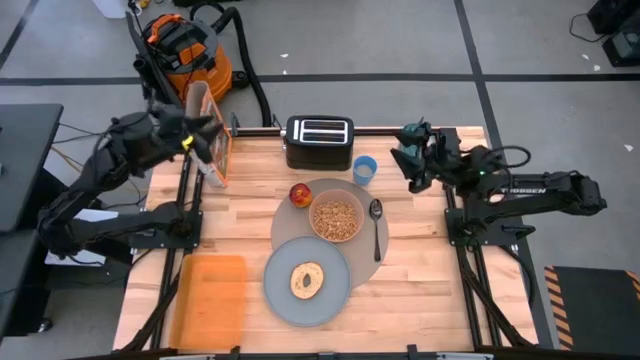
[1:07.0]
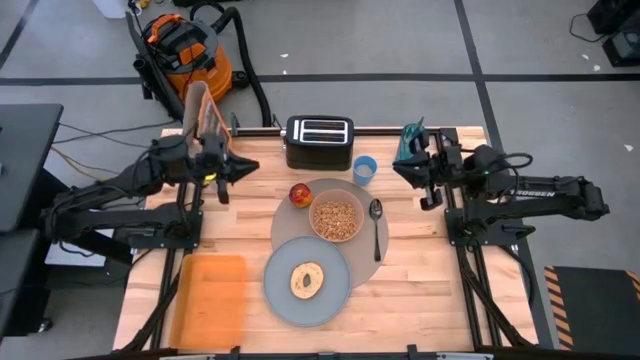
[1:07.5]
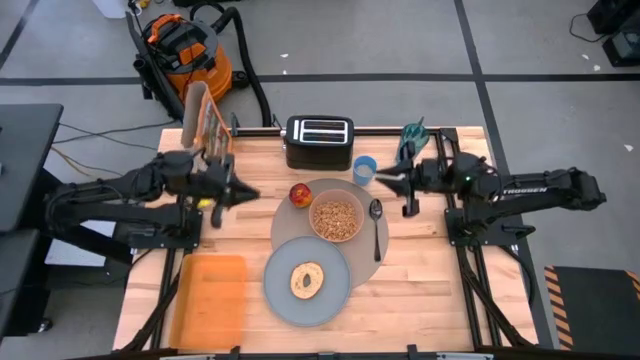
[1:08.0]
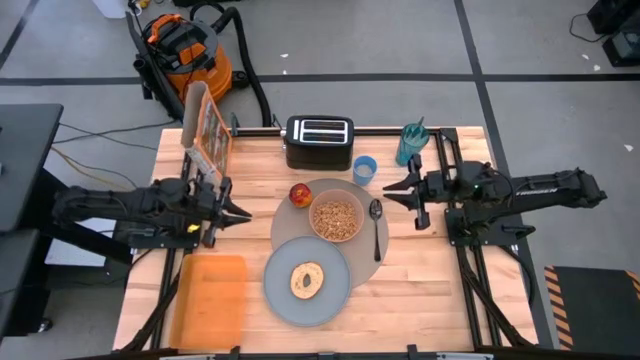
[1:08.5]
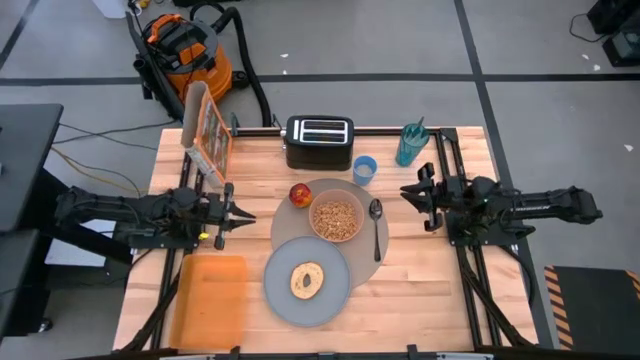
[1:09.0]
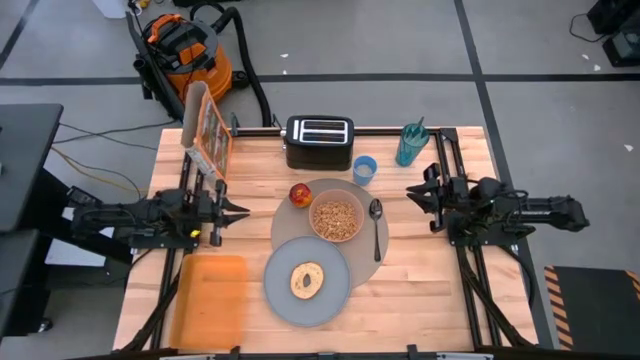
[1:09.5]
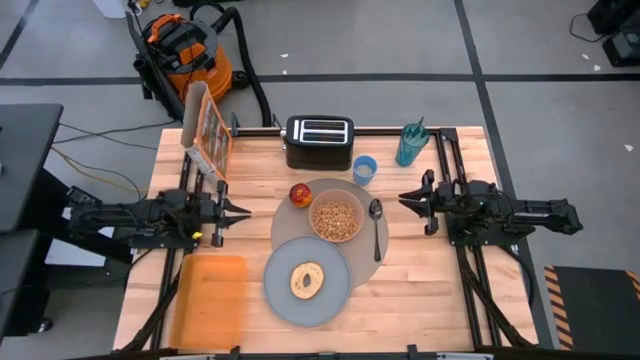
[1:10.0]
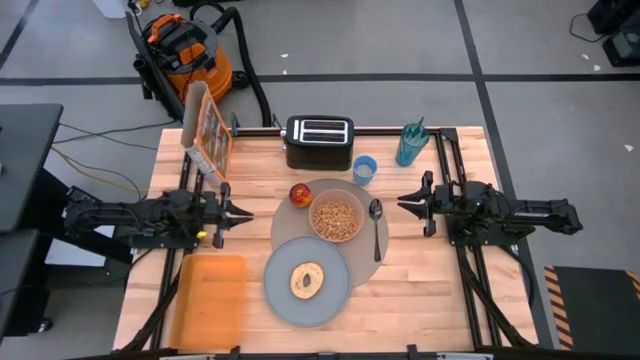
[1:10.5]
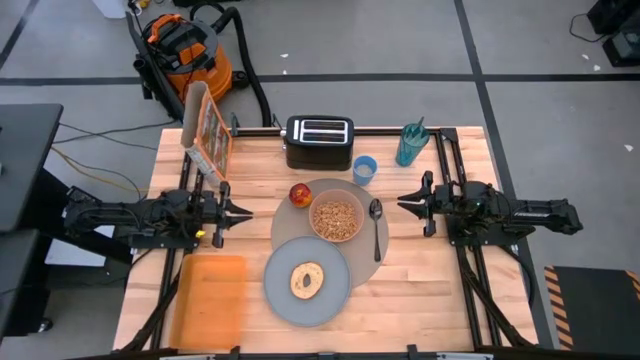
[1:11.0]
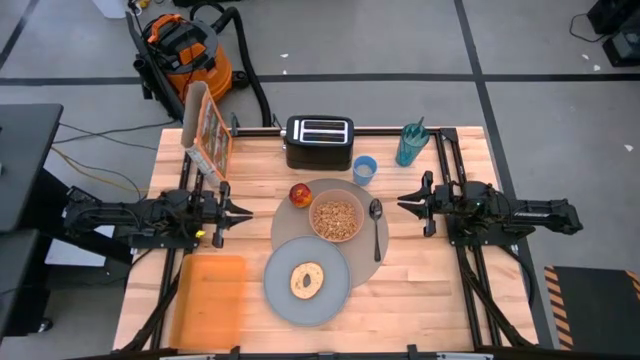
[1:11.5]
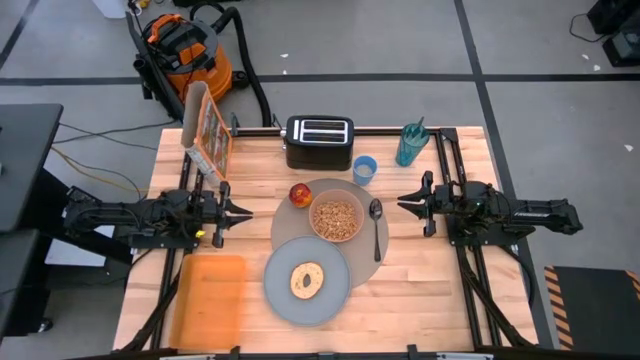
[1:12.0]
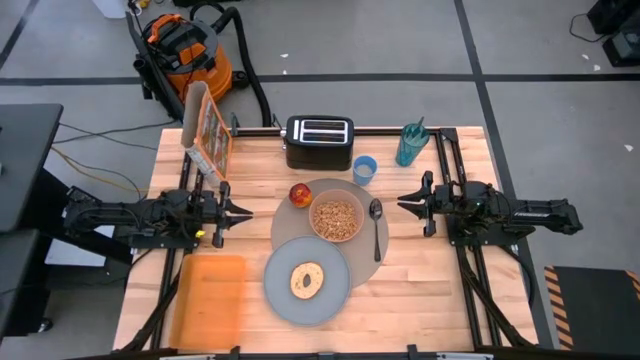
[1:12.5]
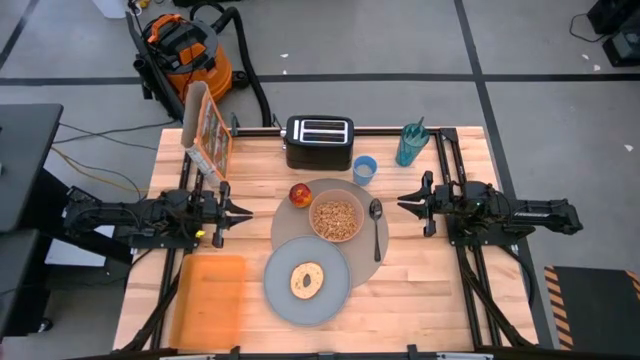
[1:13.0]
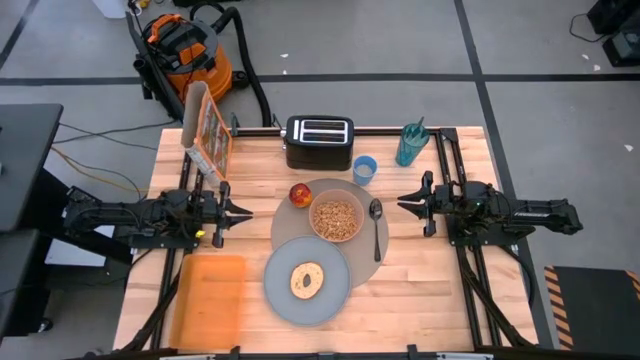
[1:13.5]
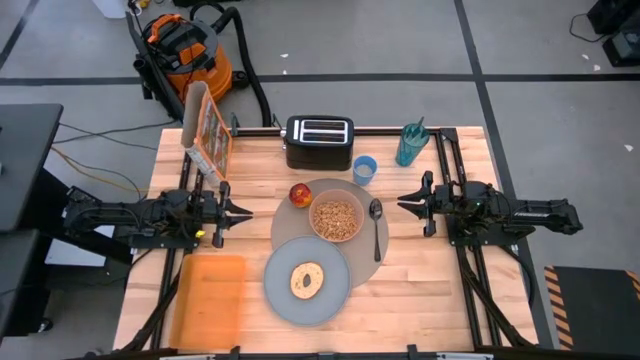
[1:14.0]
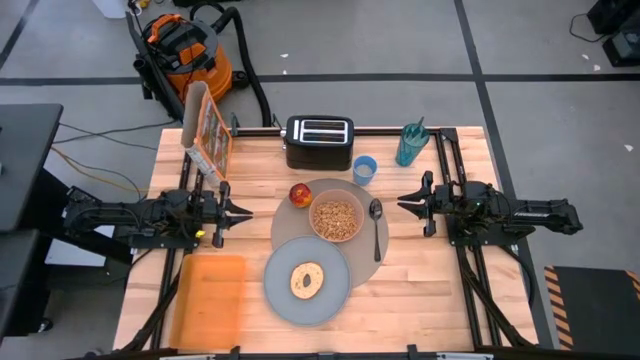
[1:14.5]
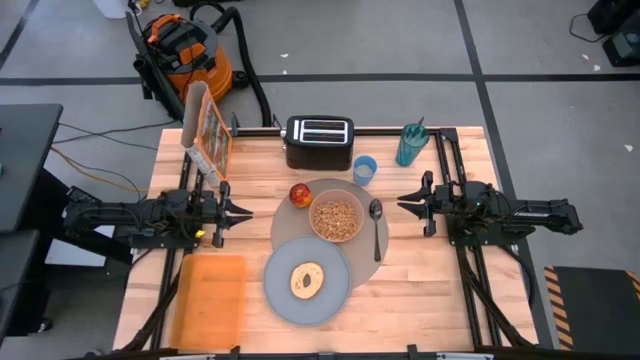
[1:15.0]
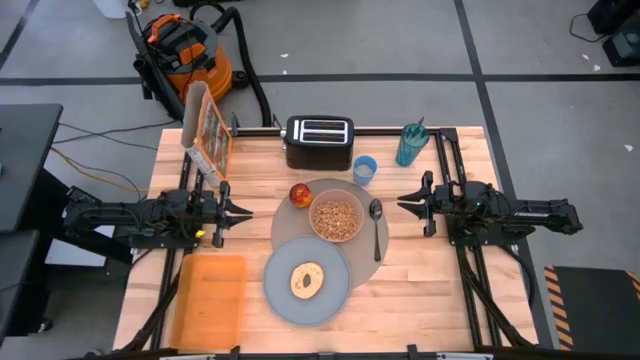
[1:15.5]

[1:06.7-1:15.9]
Task: Arrange a breakfast setting
Return to Home Position

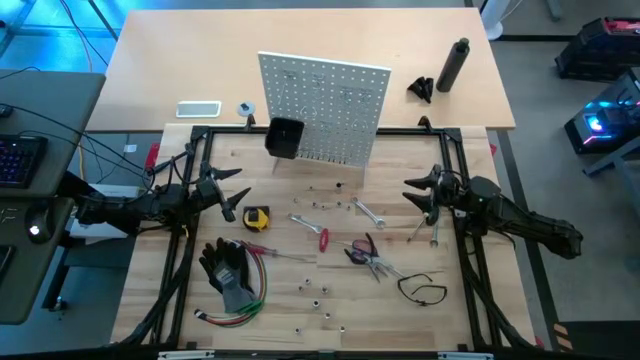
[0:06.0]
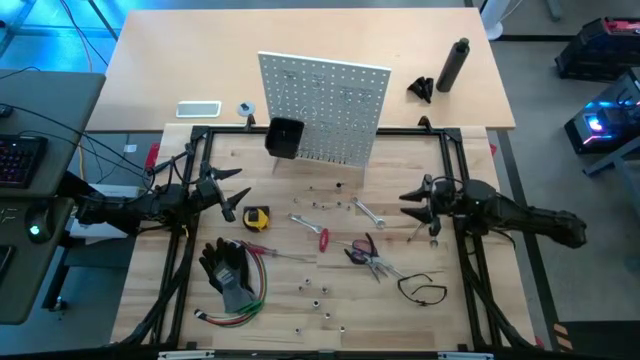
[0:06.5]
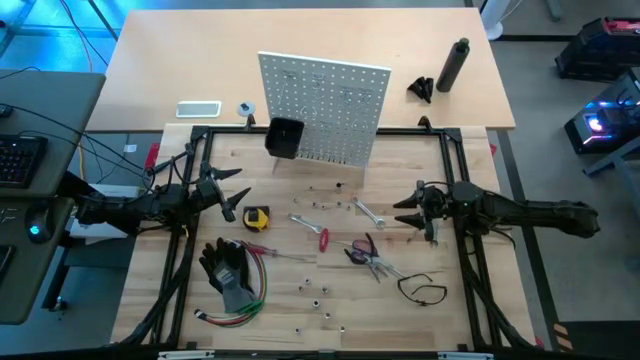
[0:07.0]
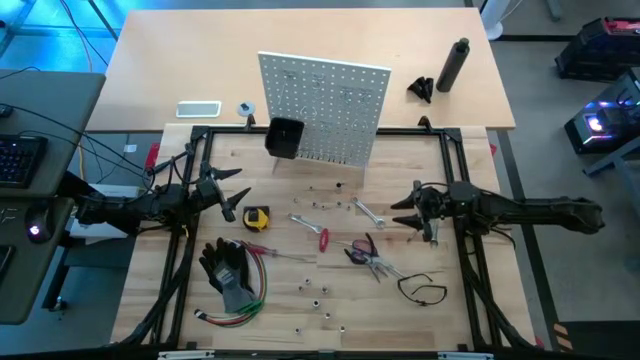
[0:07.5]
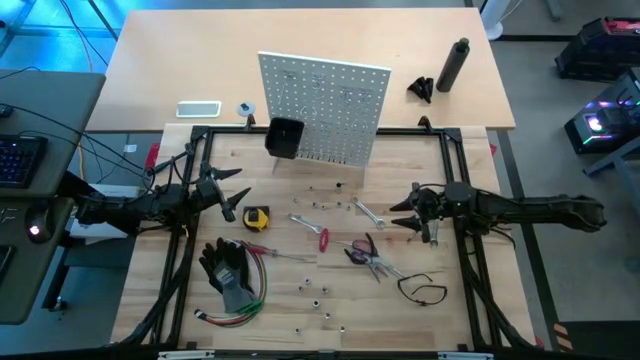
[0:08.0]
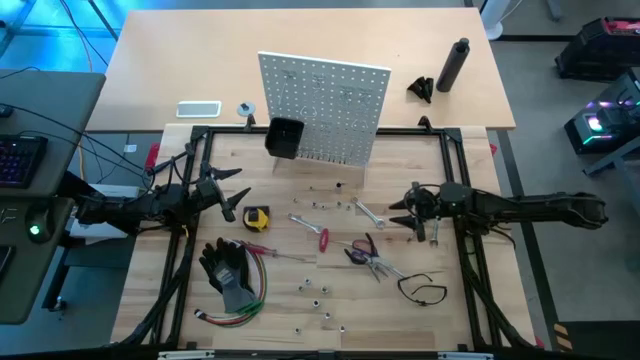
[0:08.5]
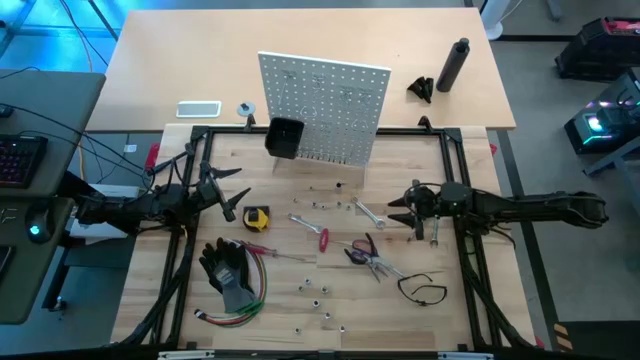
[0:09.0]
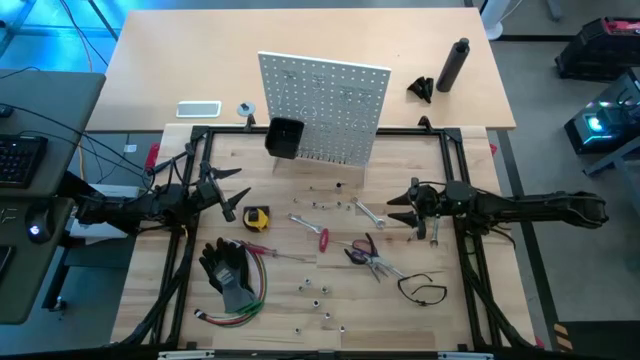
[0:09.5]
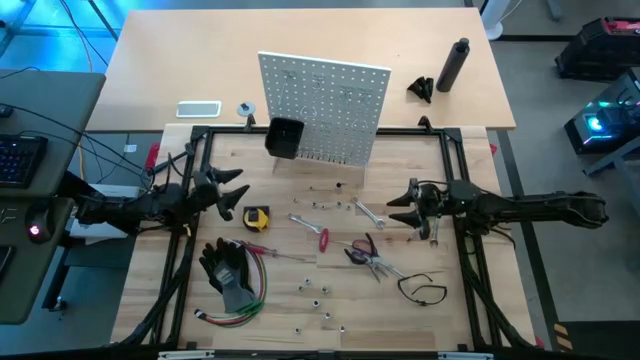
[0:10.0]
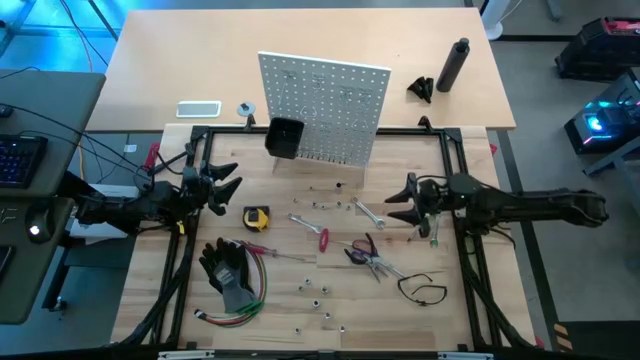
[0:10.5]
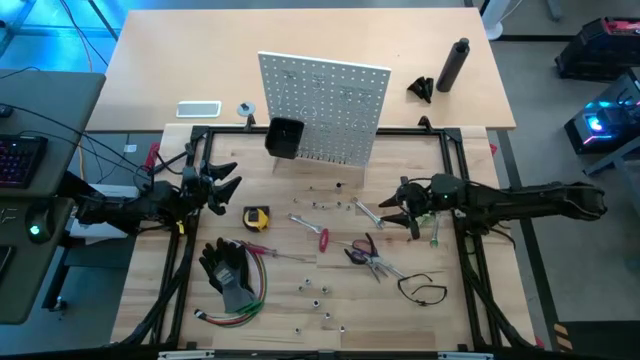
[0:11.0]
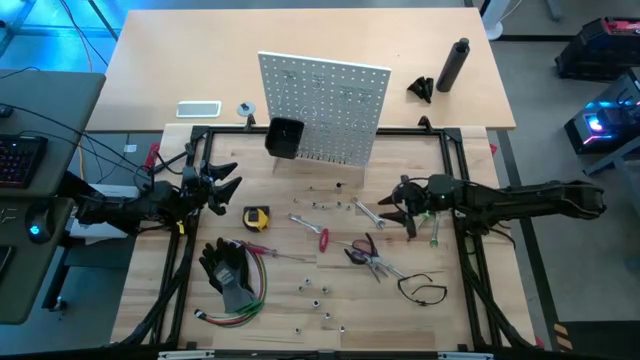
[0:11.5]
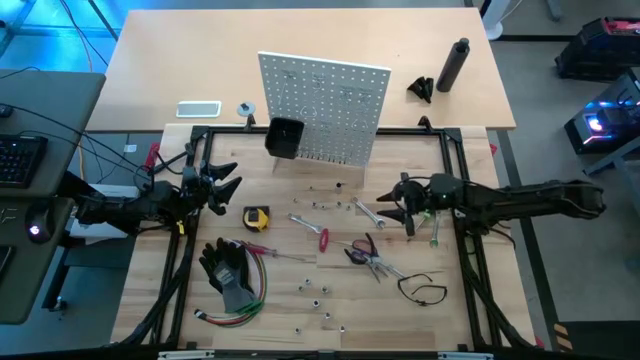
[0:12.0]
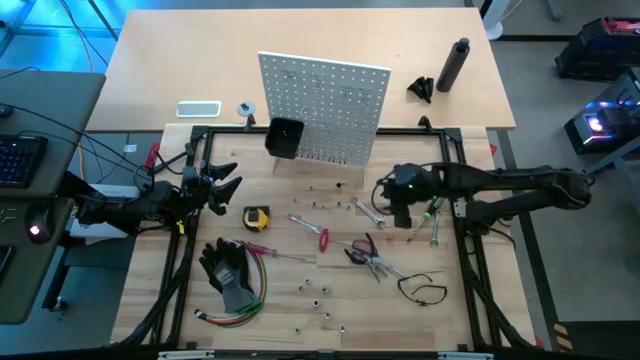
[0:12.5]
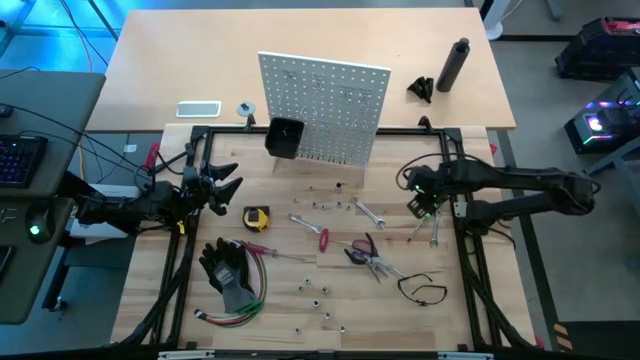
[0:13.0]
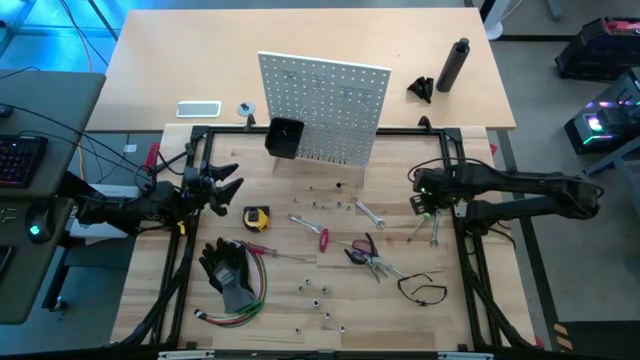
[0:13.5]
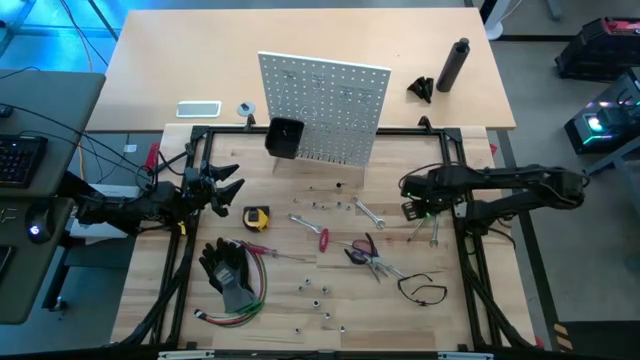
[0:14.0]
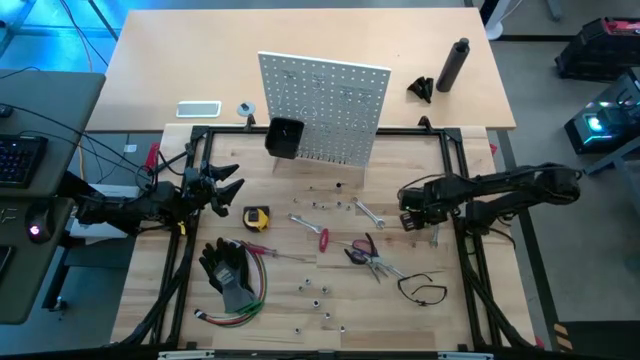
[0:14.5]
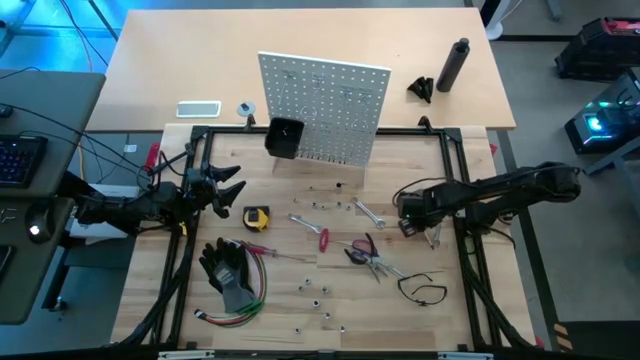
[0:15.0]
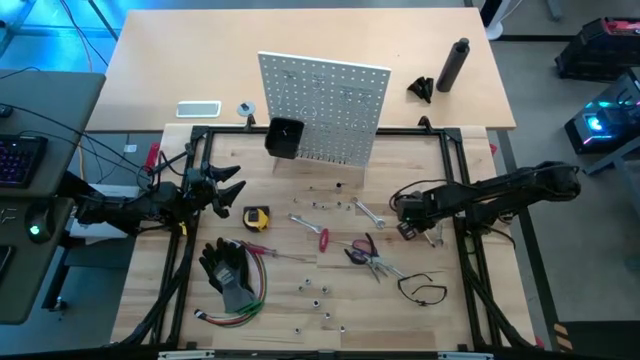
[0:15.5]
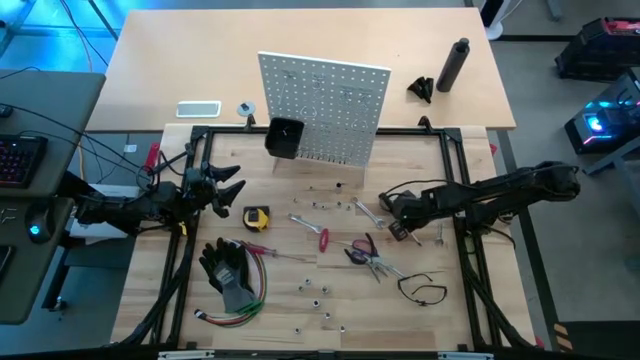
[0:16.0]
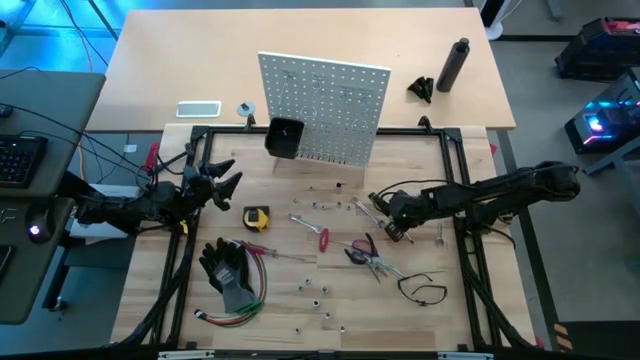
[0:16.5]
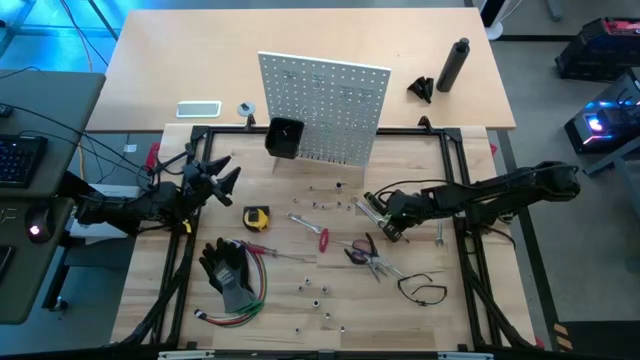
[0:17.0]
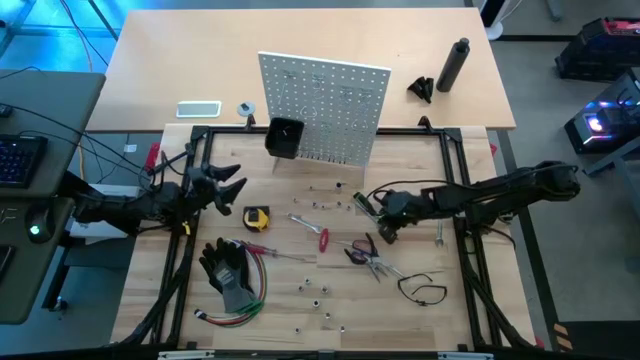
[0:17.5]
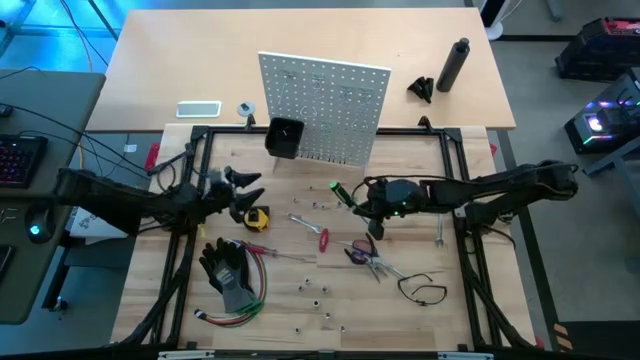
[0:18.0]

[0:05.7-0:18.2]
Task: Hang tools onto peg board
Hang the green screwdriver on the white peg board
